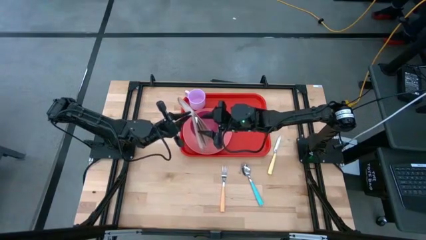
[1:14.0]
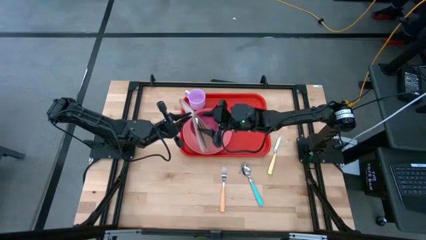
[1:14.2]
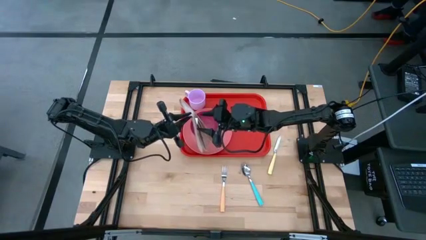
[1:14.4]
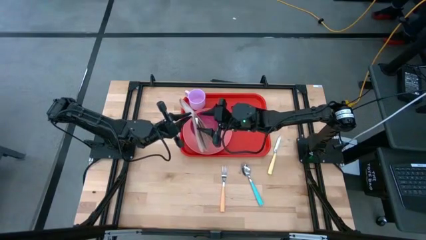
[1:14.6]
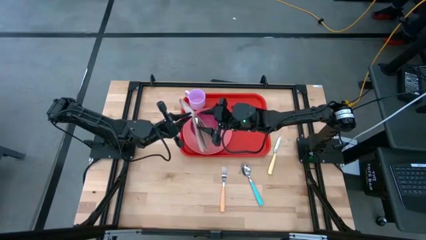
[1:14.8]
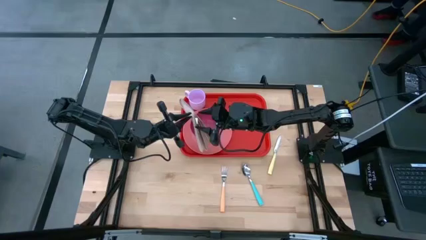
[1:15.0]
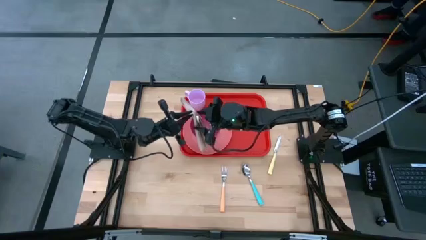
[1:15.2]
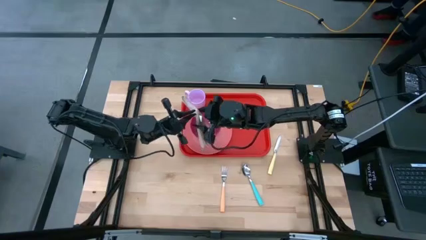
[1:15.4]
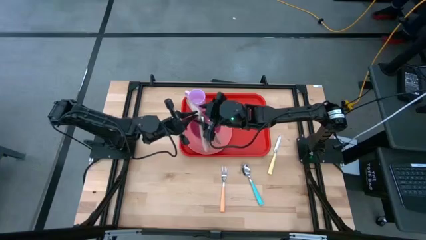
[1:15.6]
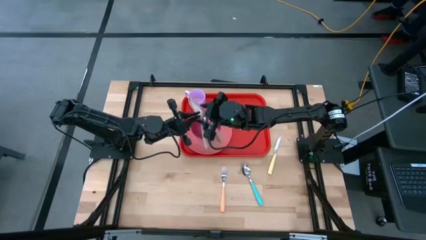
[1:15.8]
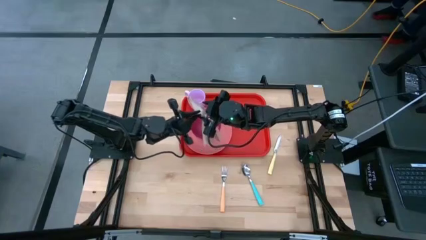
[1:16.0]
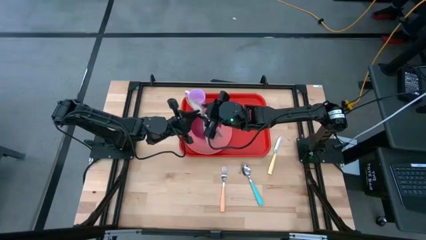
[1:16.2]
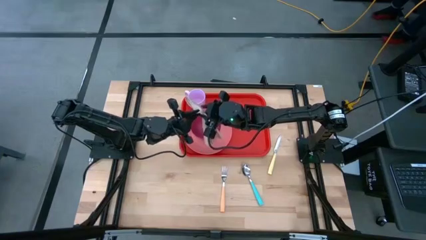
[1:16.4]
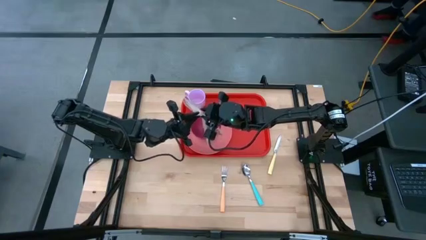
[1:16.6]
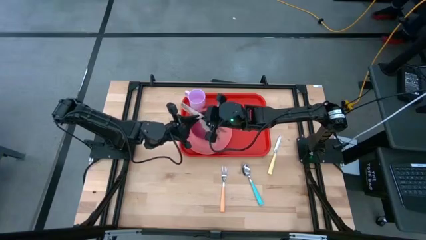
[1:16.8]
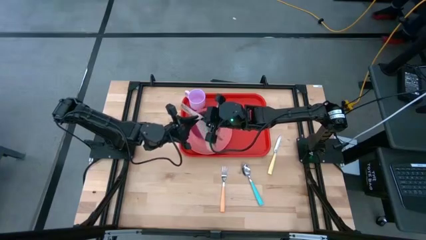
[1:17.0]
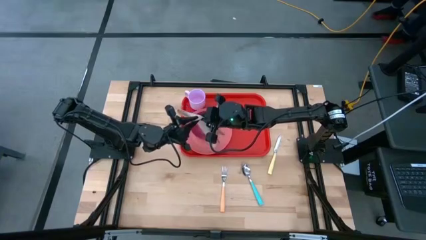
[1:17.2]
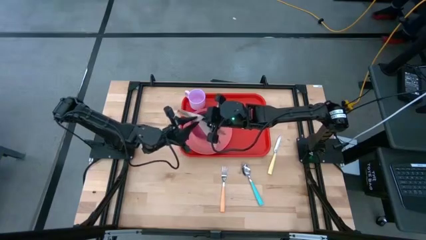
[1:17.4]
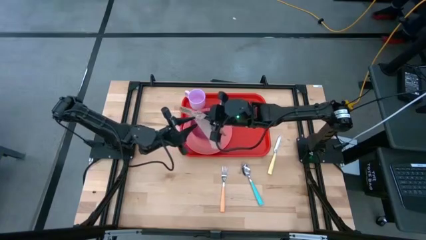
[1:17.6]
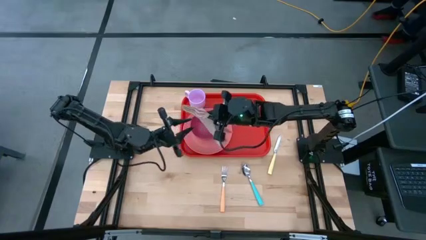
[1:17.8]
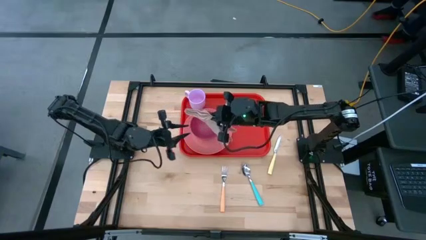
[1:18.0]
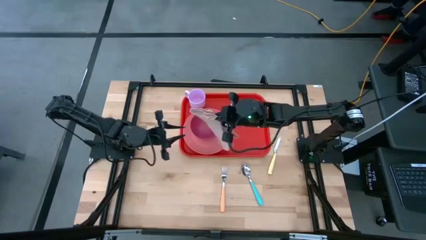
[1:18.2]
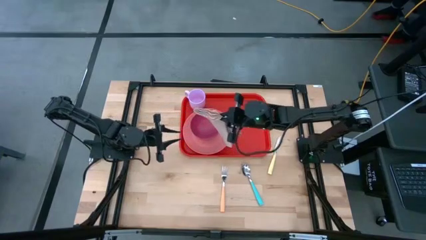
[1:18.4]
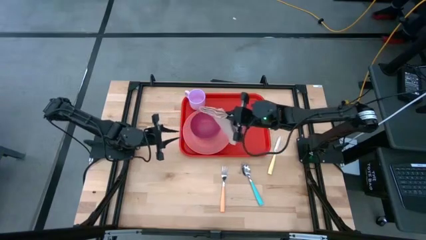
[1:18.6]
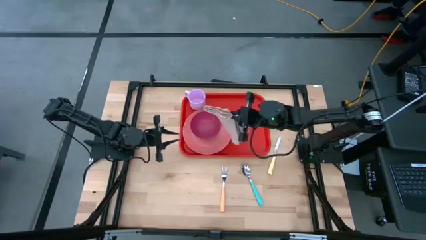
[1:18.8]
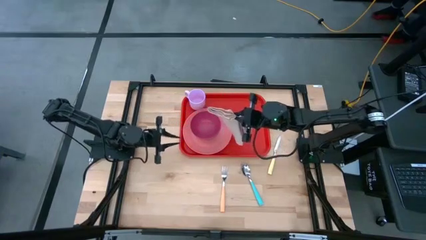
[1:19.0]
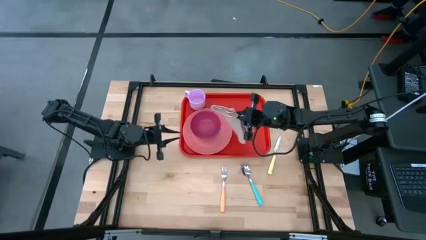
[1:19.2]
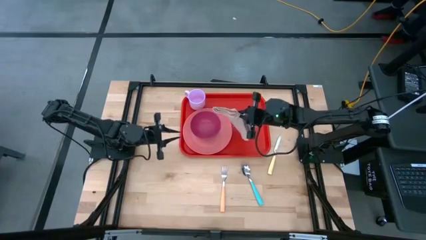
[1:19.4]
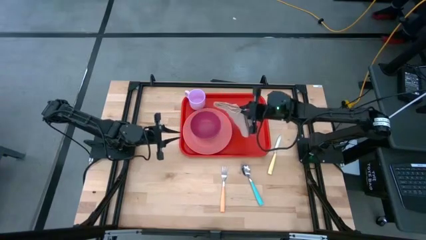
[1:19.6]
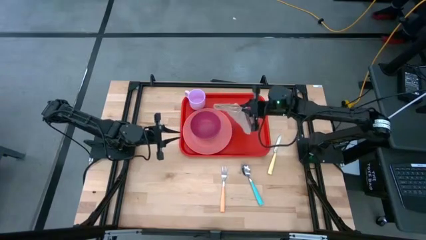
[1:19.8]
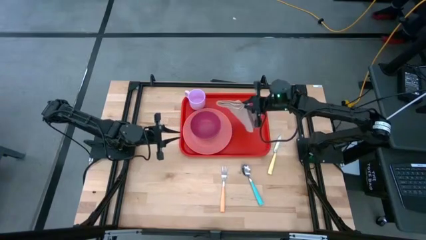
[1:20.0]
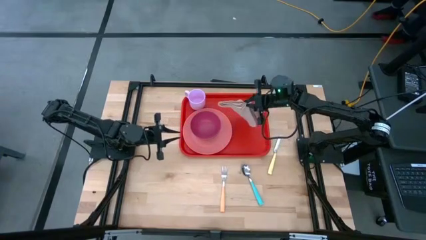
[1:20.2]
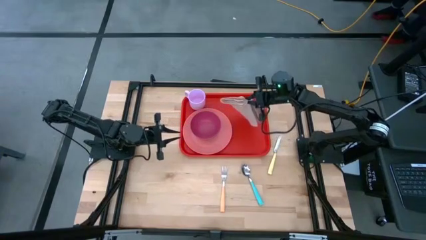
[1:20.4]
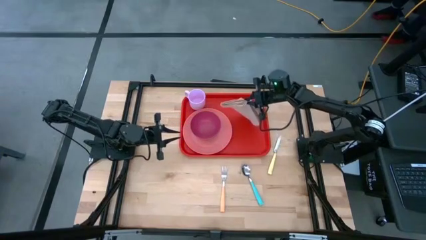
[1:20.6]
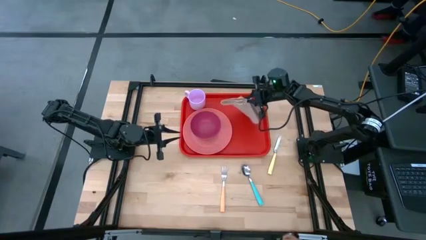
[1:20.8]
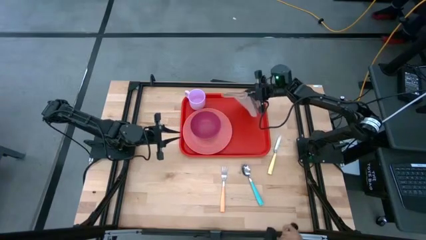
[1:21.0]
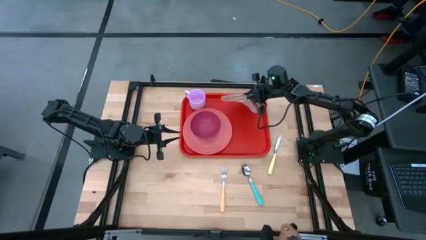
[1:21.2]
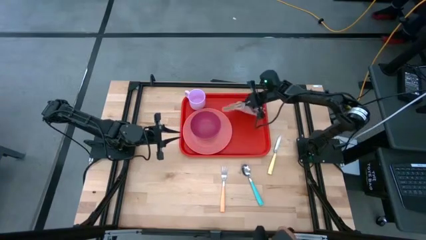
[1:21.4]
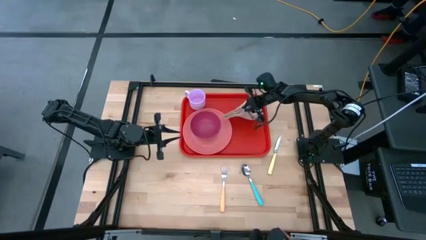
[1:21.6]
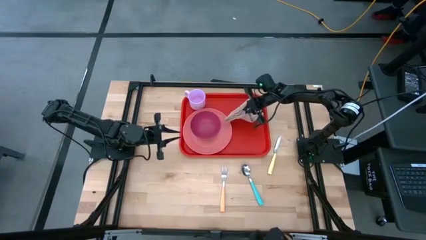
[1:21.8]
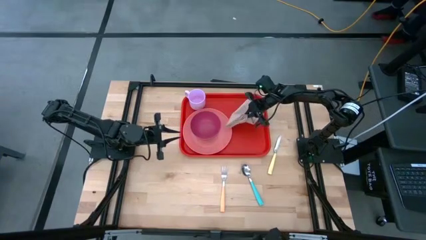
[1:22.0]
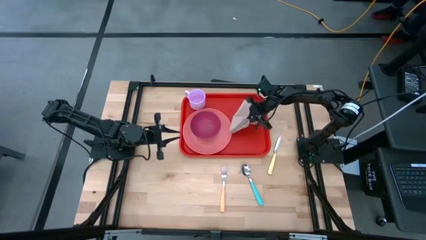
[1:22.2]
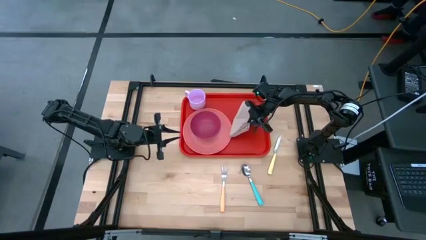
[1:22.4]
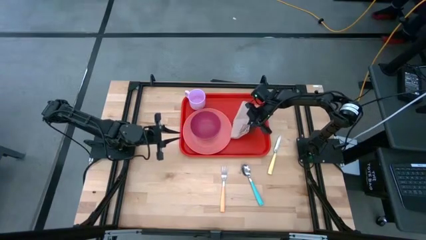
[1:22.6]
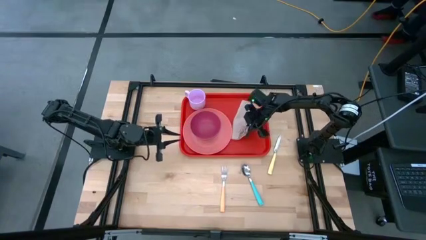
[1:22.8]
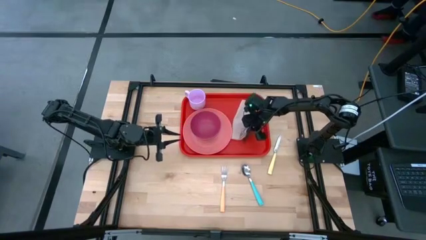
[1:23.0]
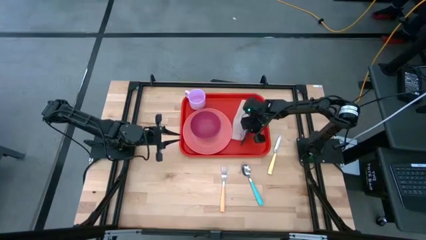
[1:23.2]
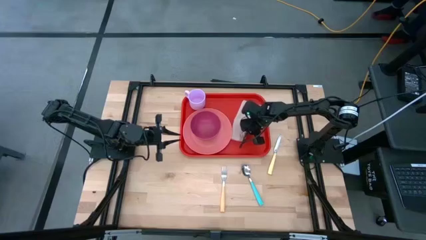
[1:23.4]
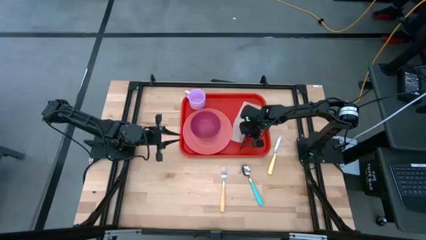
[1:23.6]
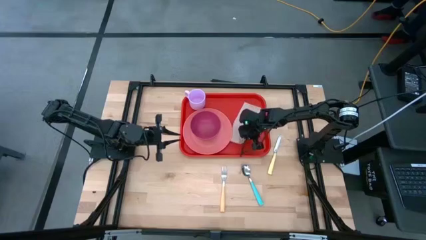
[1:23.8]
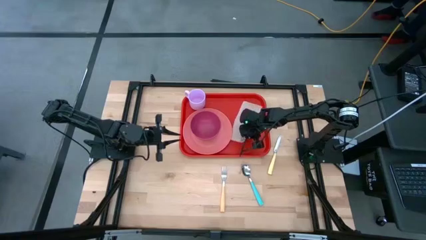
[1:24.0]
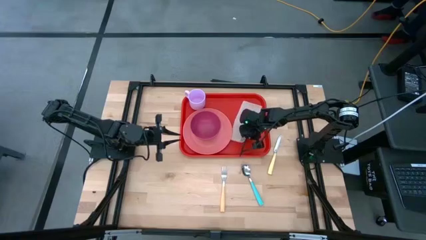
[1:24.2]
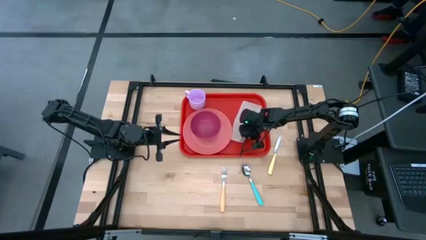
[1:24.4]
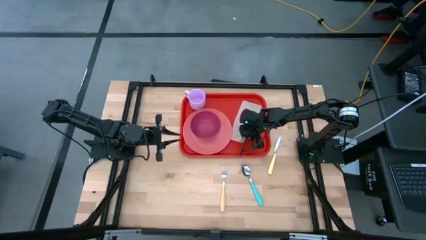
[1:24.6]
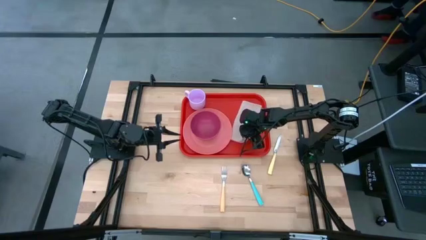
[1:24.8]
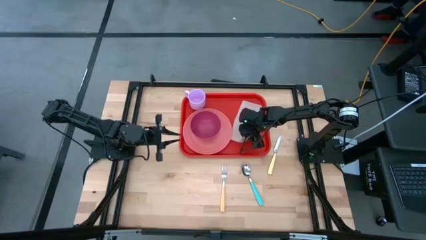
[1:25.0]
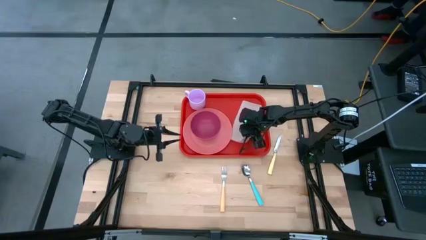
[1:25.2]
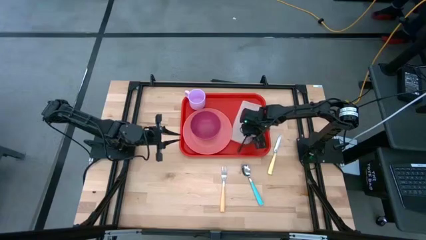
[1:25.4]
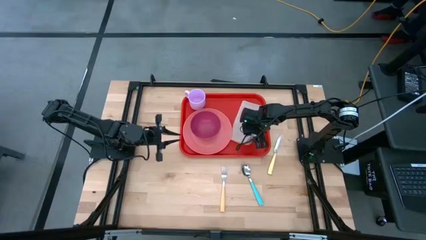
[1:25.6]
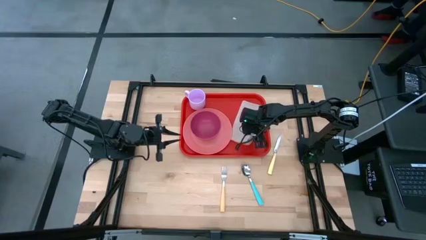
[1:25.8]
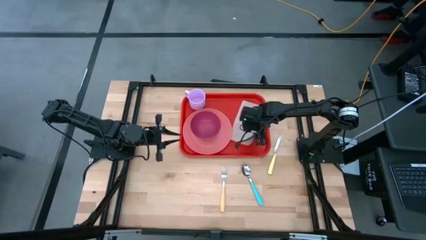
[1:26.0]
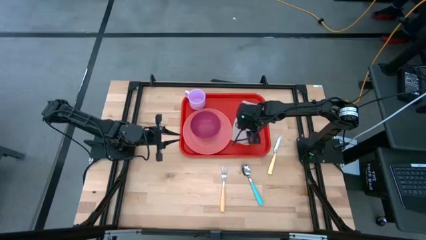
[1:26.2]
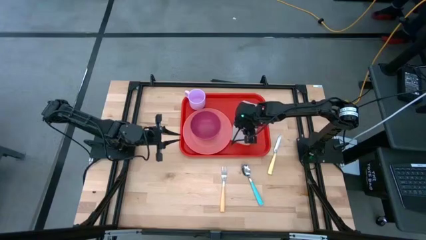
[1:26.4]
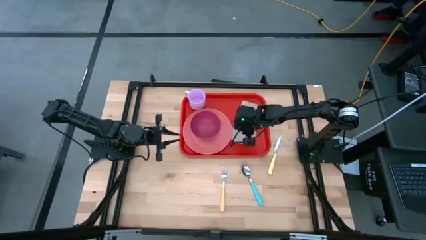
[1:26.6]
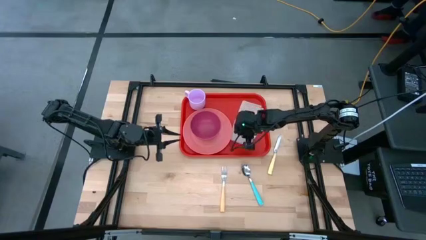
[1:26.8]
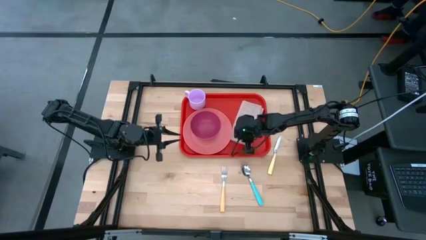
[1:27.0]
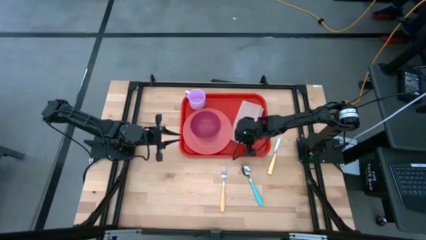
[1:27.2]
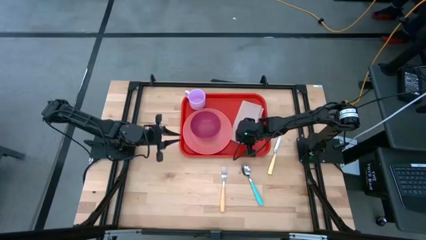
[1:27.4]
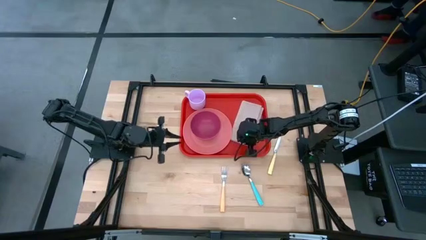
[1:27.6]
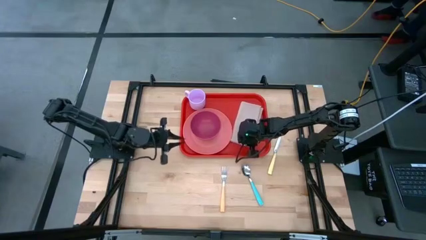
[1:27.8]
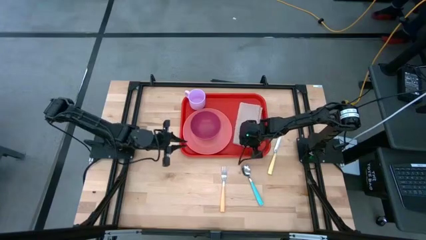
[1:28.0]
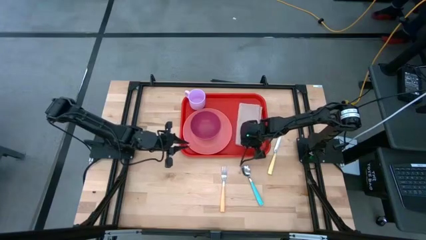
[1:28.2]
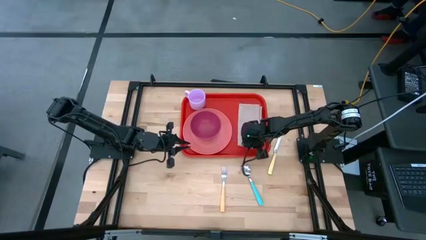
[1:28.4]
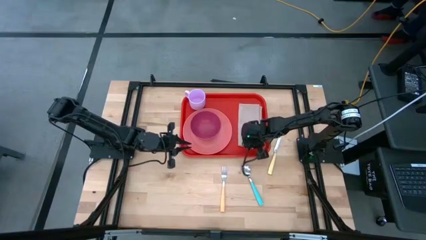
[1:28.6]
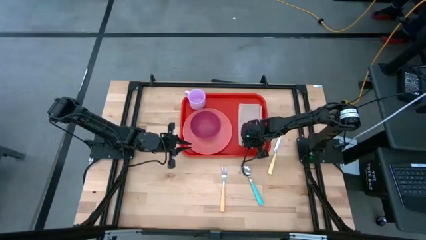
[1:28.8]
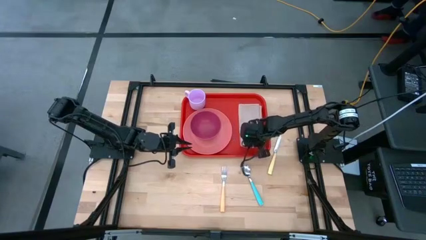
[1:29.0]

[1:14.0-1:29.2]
Task: Set up tray
Put the brown table napkin on the red tray to the right of the pink plate
